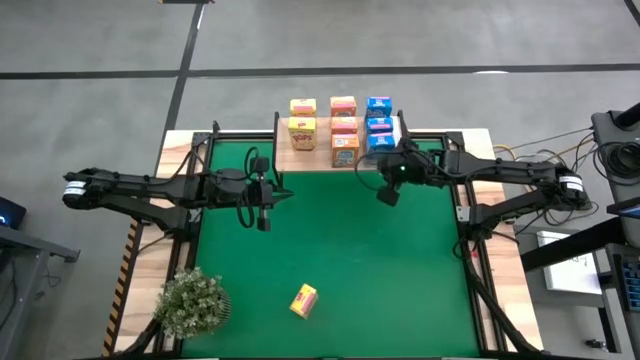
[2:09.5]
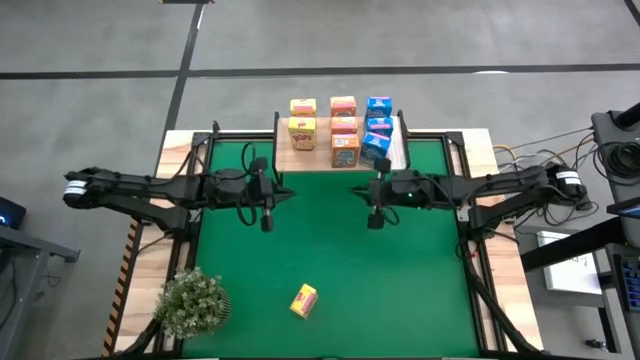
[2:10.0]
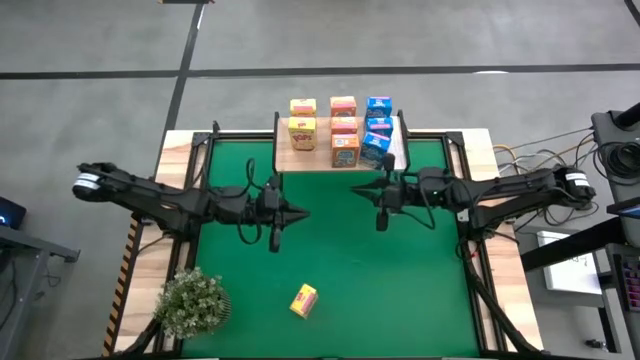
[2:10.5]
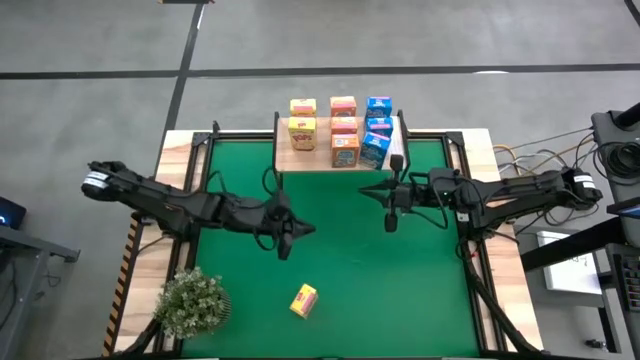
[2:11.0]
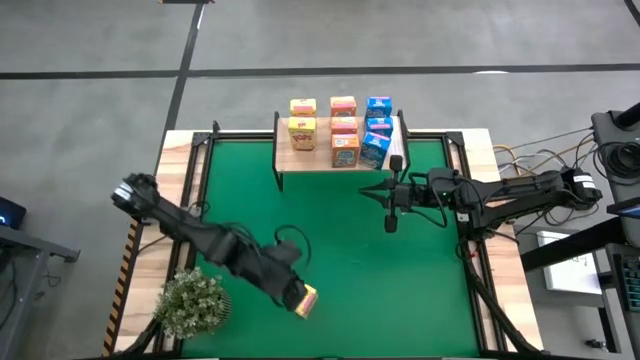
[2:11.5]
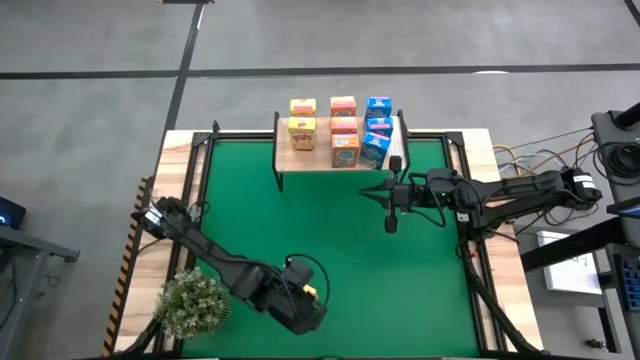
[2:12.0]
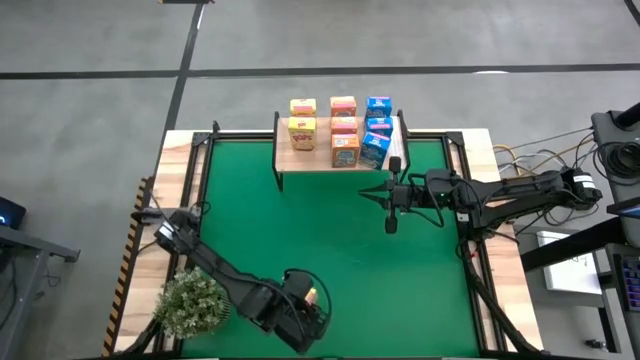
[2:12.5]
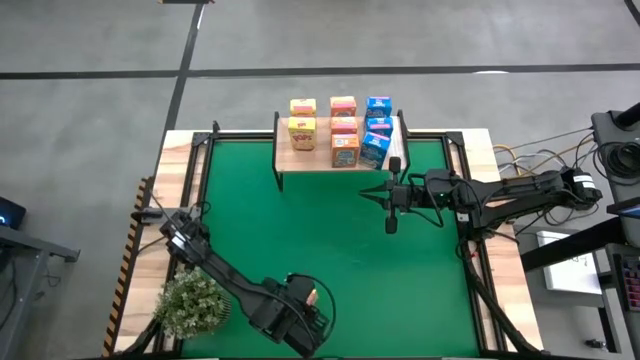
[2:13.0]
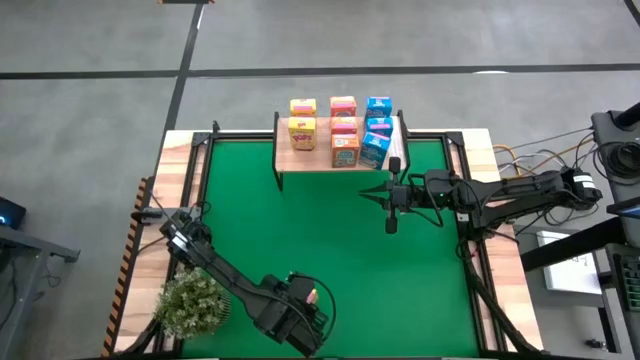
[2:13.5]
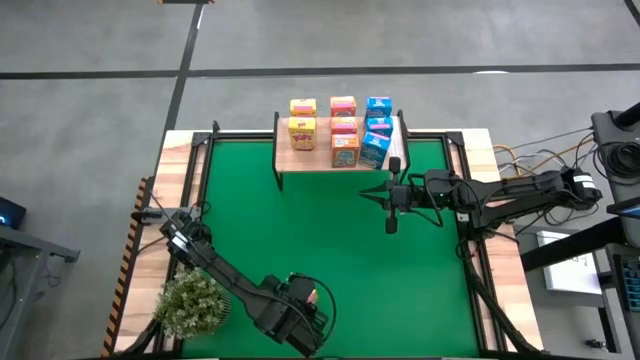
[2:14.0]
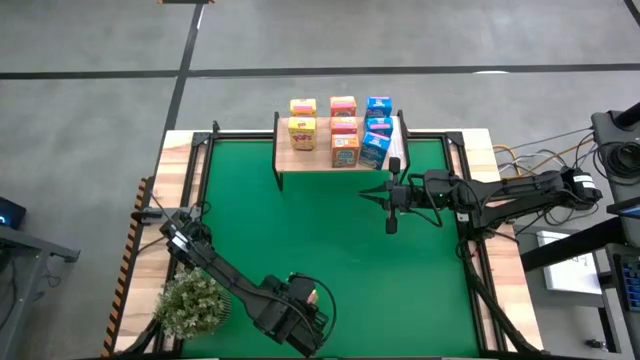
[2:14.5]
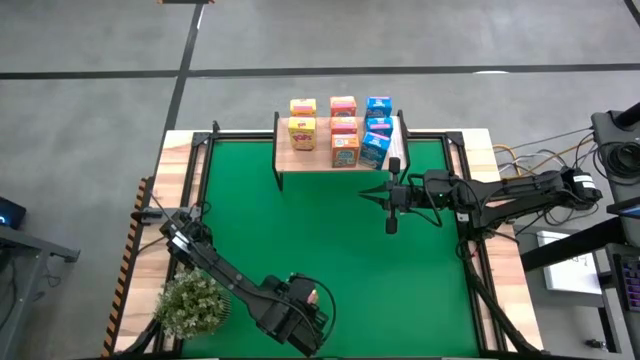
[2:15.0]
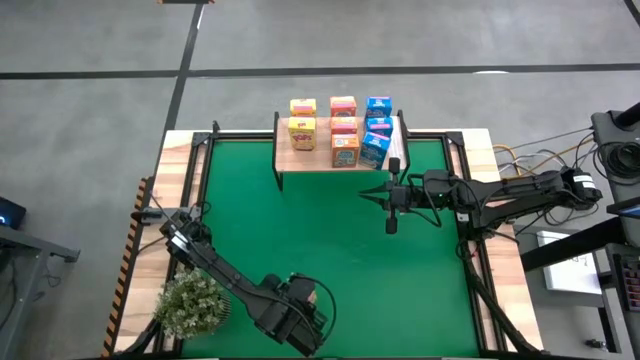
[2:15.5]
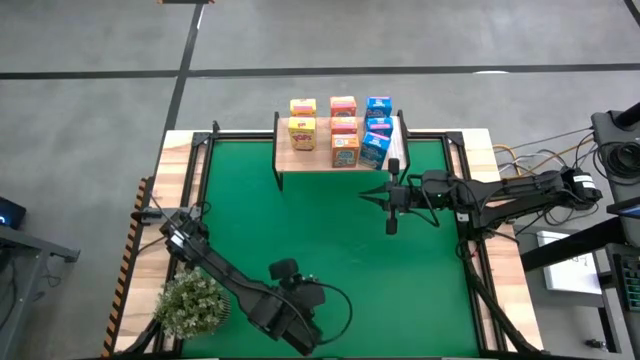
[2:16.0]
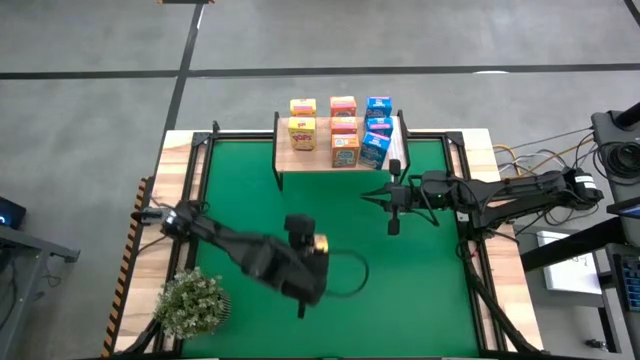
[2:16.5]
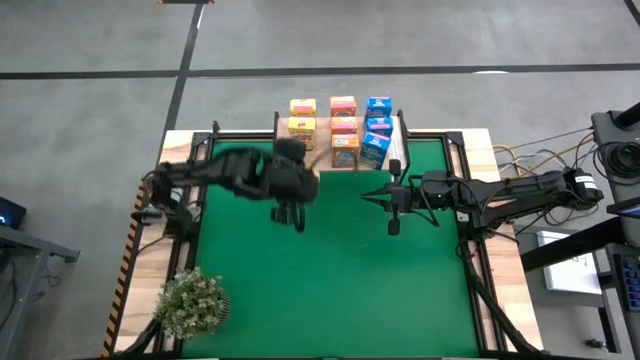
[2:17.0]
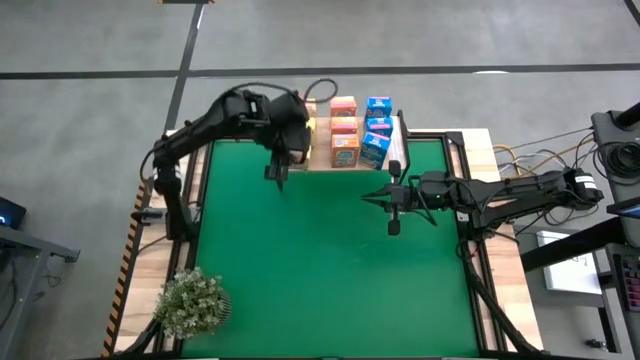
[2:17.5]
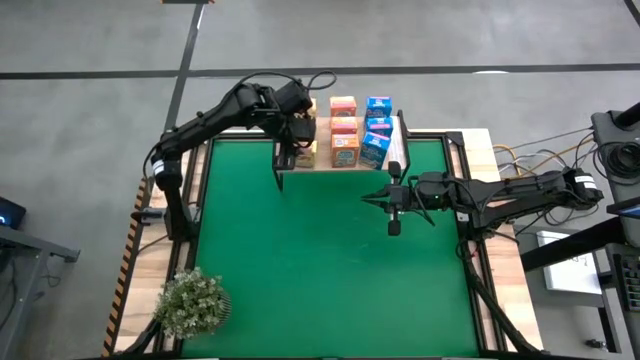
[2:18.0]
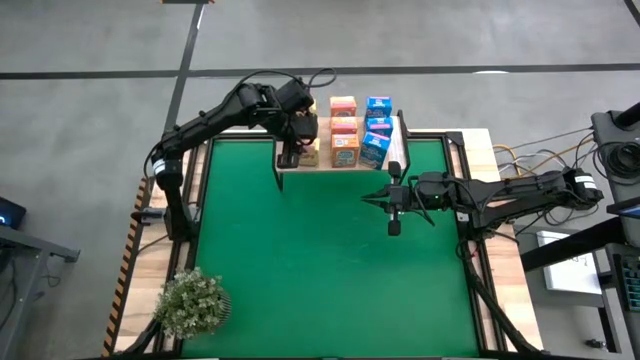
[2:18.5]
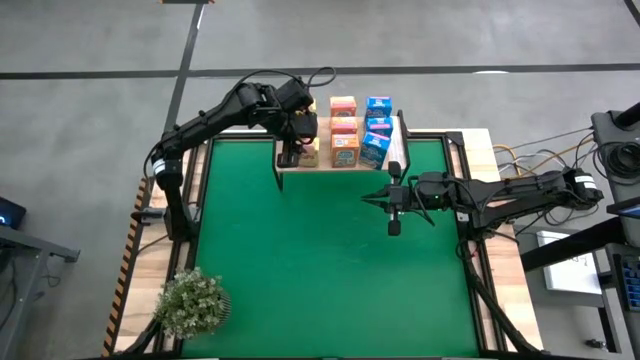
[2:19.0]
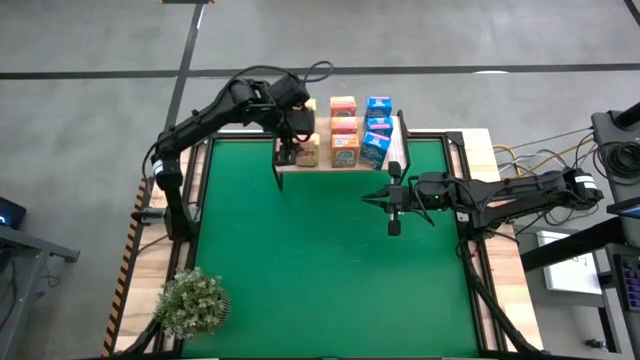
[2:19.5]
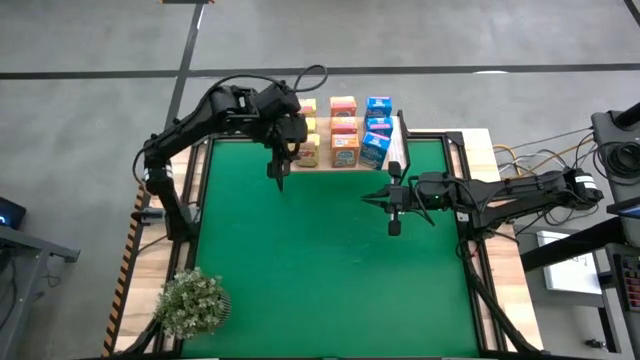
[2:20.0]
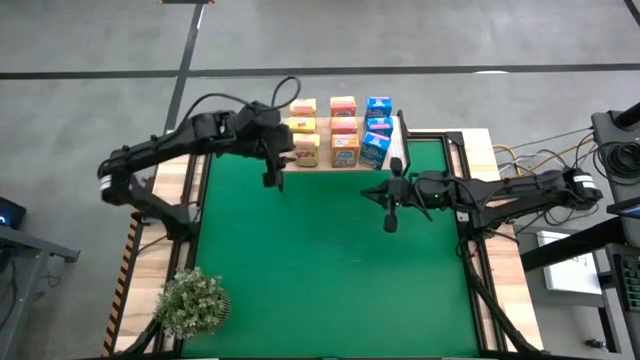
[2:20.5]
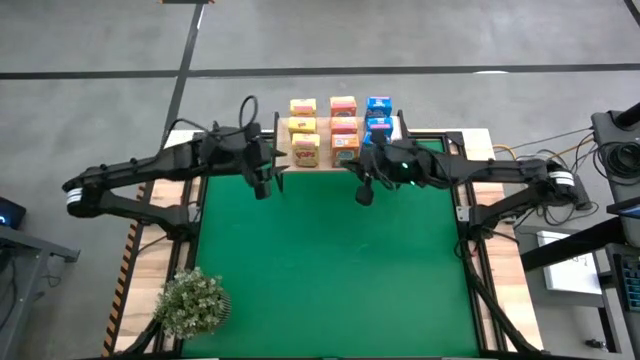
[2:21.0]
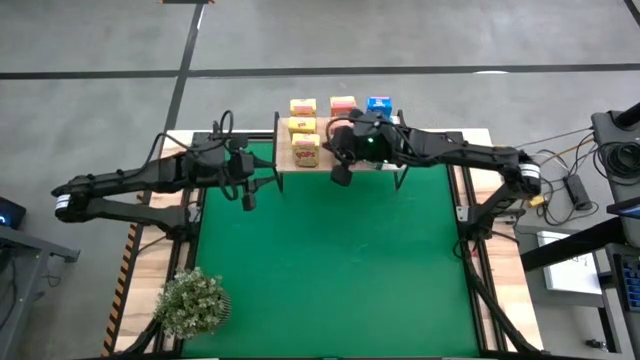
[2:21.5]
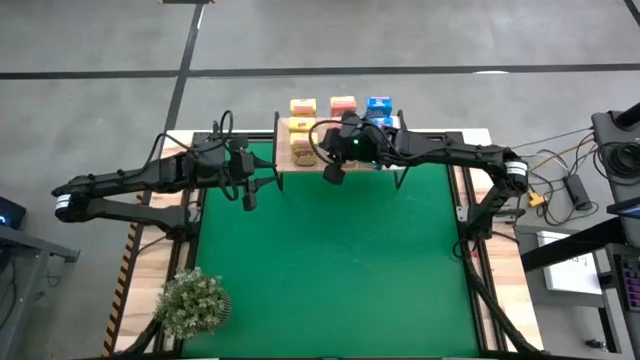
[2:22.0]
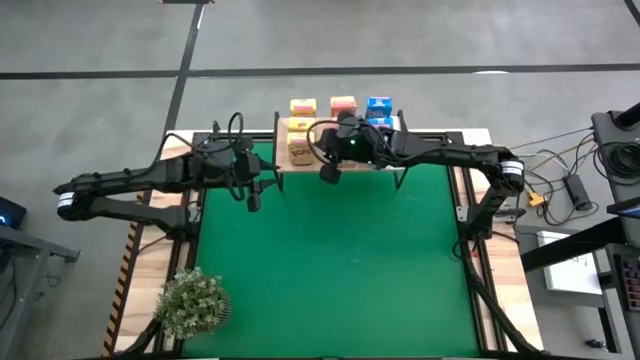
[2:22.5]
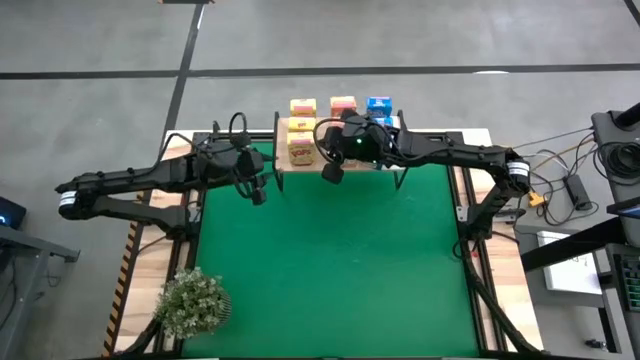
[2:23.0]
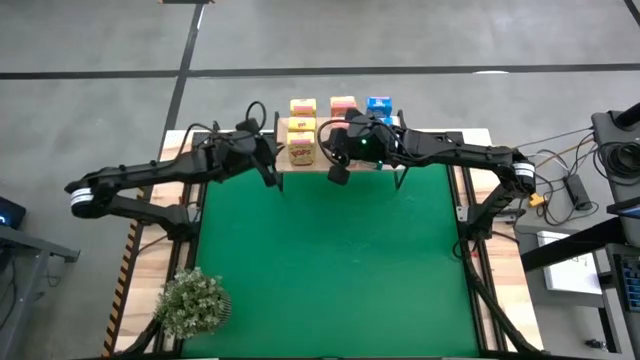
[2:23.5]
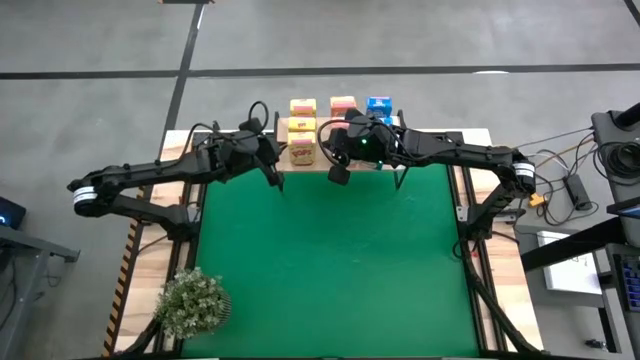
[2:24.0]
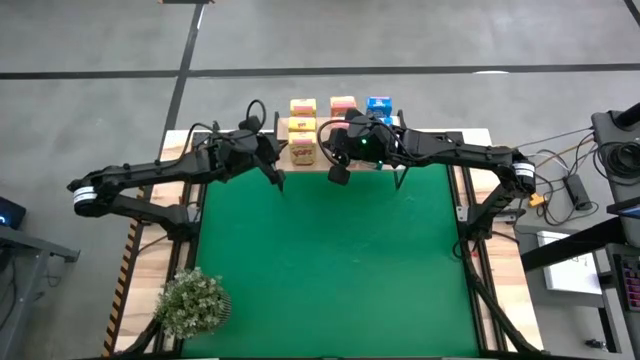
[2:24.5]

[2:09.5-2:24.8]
Task: Stack cereal on shelf
Put the yellow cereal box on the shelf aligned with the other yellow cereal boxes

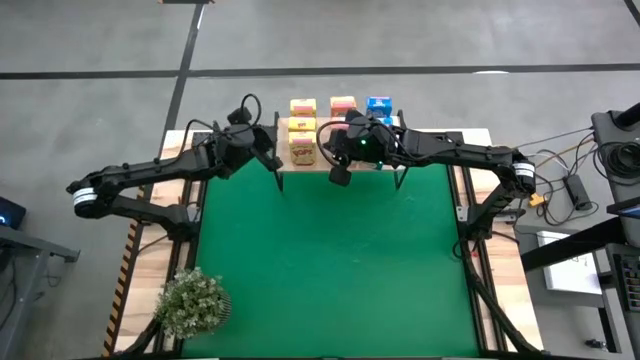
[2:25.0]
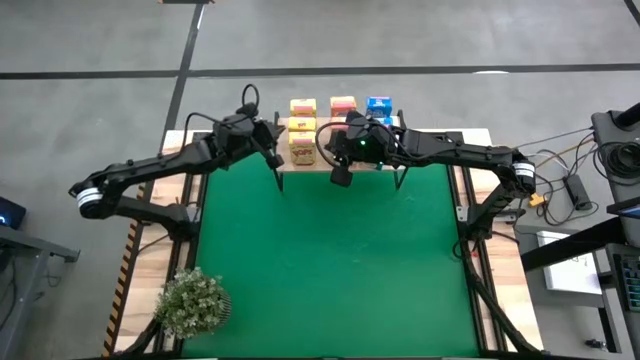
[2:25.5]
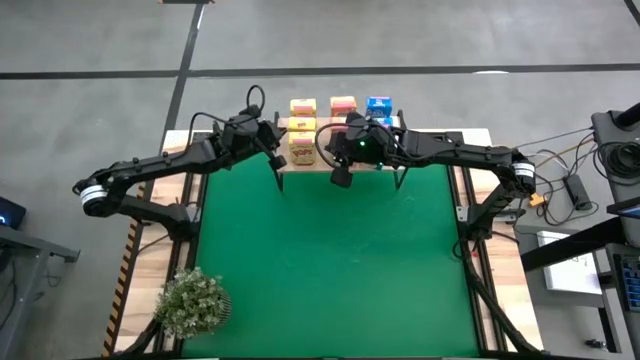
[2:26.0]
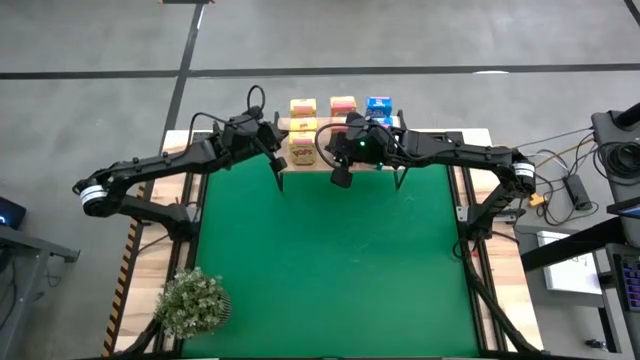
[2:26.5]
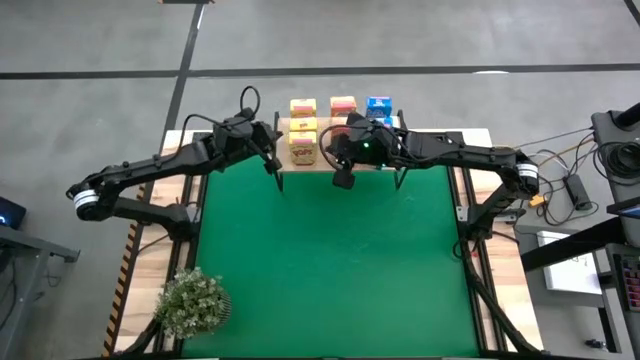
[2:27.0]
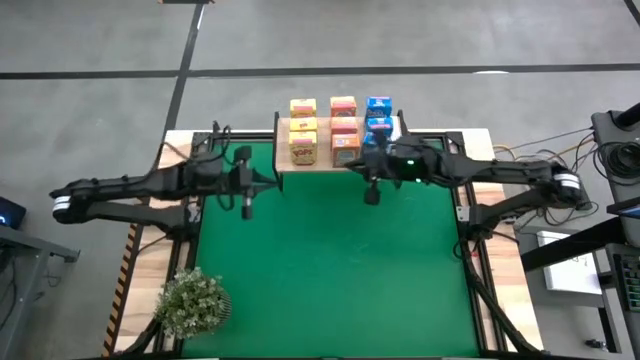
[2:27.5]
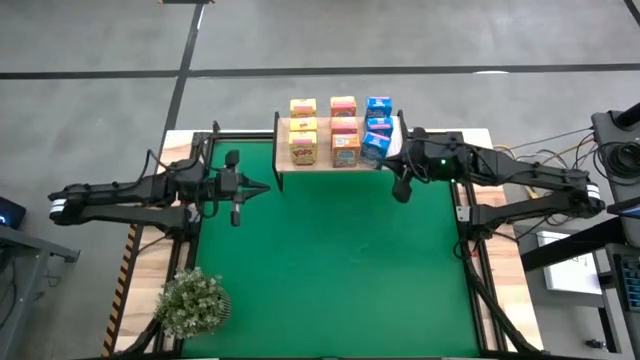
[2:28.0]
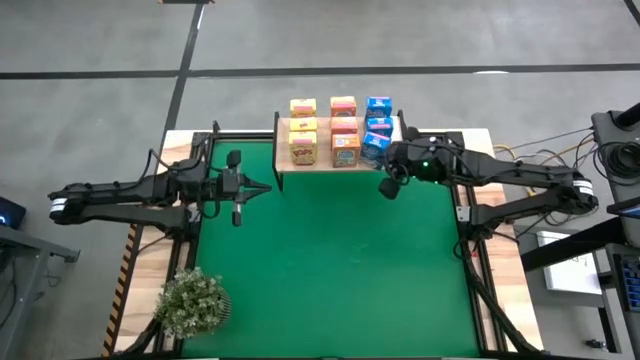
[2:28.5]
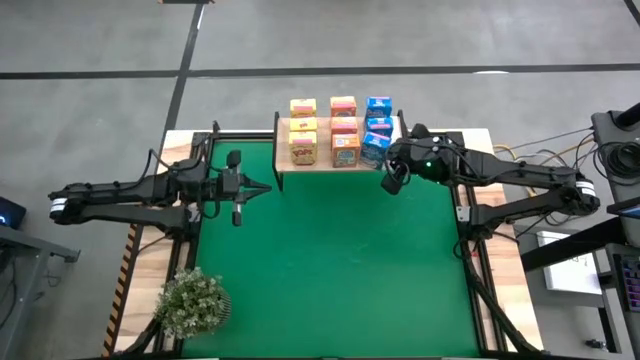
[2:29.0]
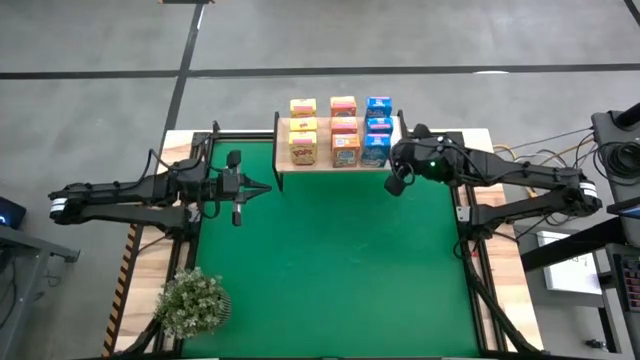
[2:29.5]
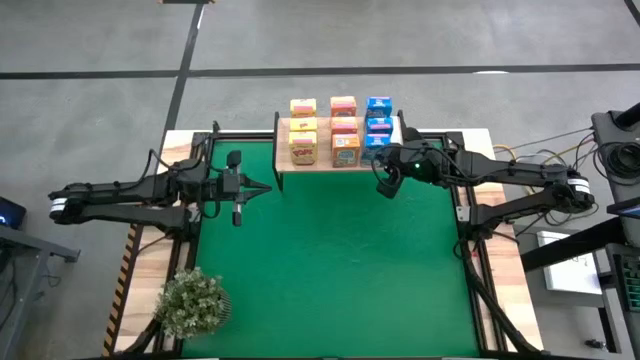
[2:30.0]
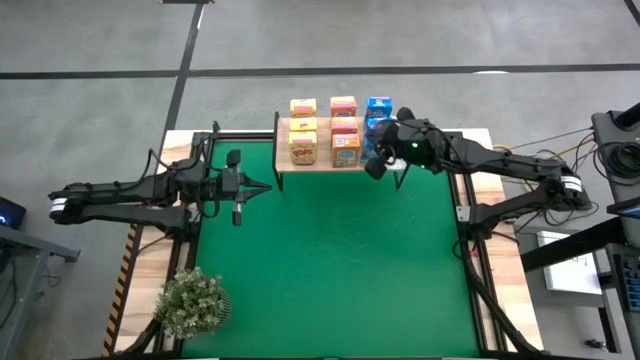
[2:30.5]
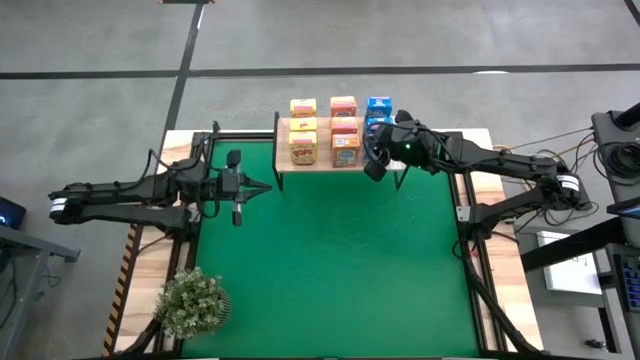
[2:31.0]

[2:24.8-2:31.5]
Adjust the cereal boxes on the shelf
